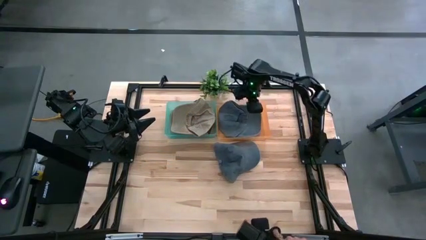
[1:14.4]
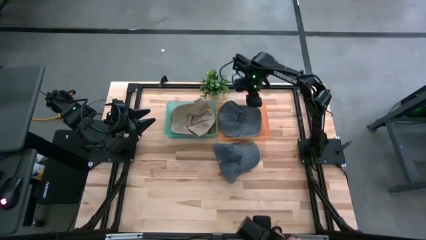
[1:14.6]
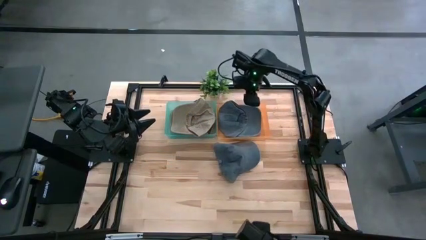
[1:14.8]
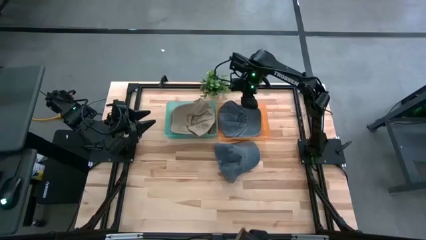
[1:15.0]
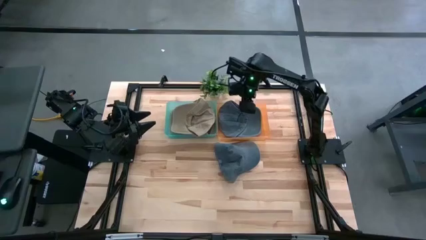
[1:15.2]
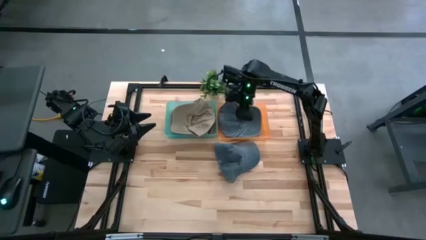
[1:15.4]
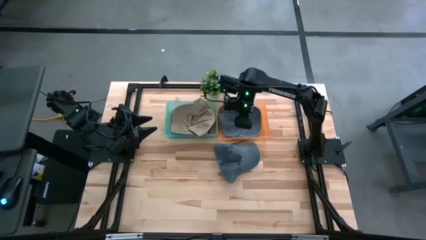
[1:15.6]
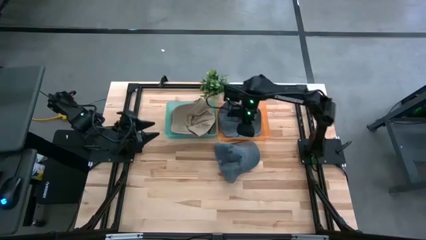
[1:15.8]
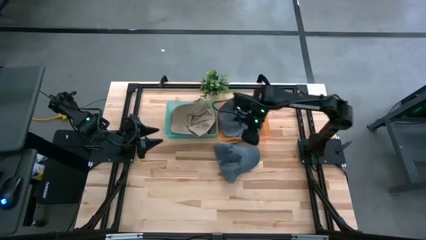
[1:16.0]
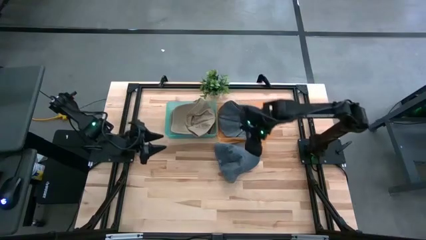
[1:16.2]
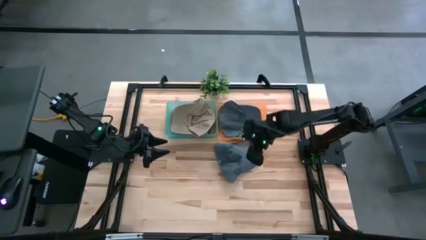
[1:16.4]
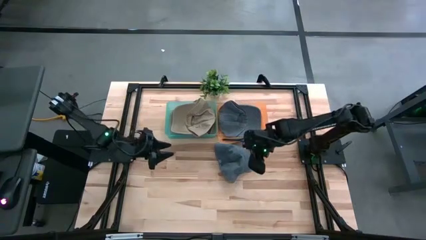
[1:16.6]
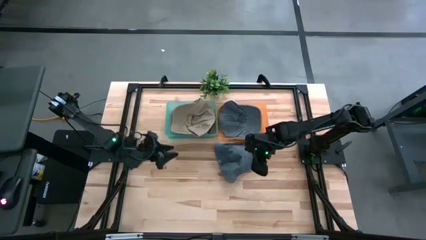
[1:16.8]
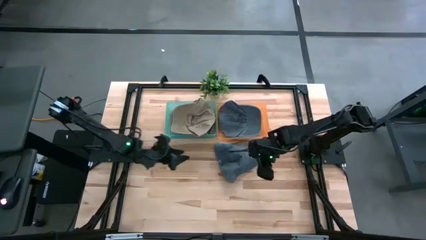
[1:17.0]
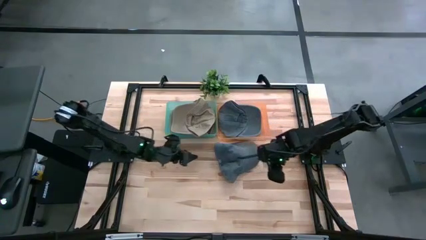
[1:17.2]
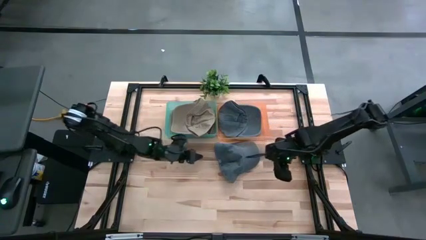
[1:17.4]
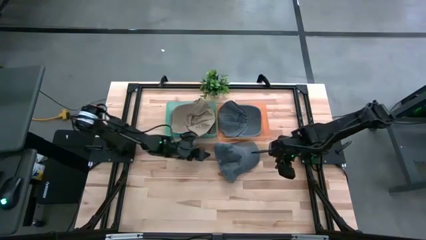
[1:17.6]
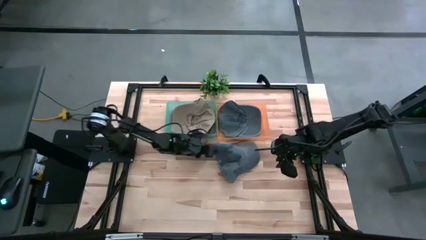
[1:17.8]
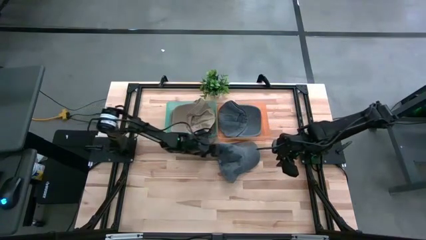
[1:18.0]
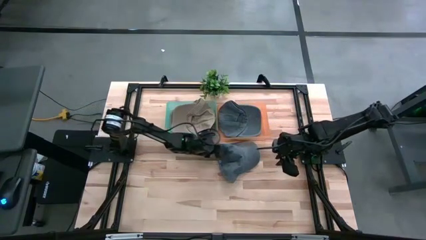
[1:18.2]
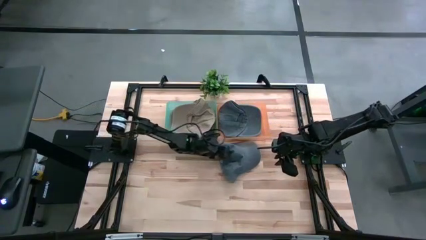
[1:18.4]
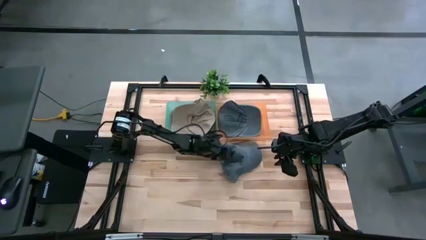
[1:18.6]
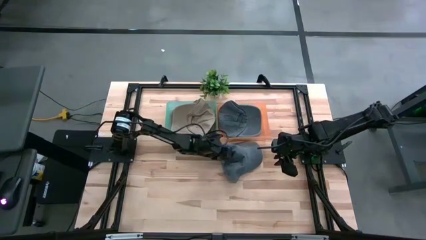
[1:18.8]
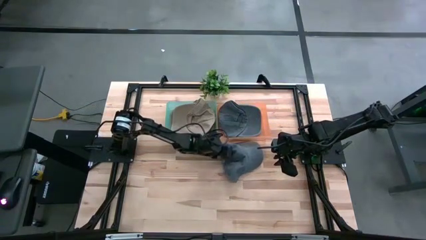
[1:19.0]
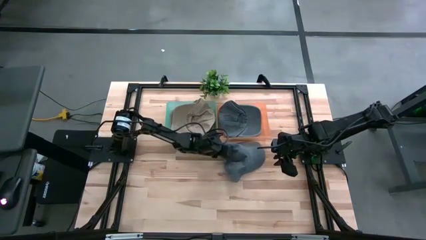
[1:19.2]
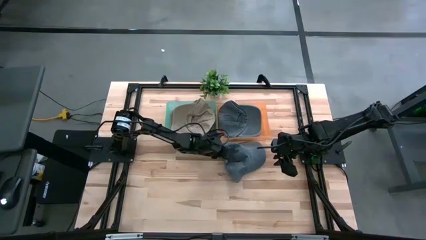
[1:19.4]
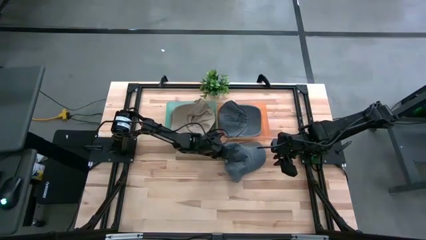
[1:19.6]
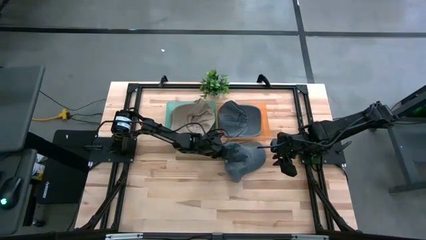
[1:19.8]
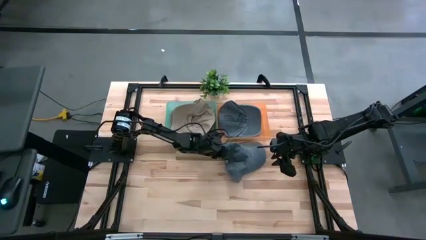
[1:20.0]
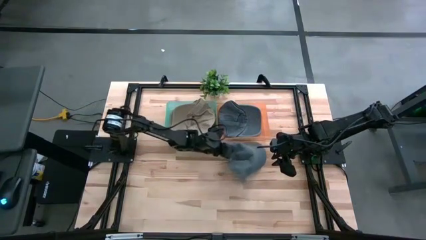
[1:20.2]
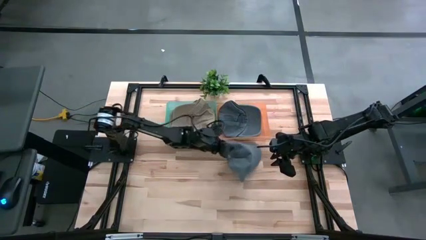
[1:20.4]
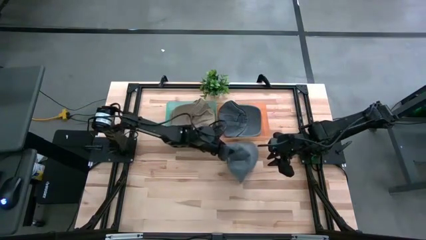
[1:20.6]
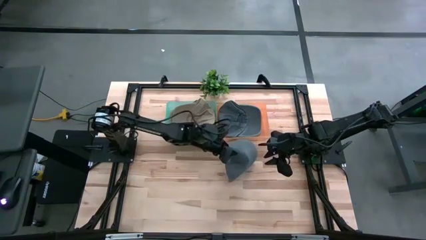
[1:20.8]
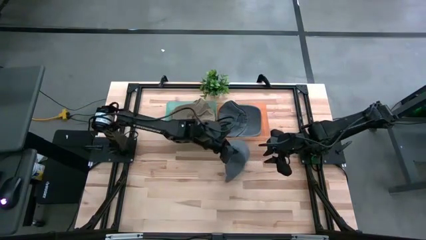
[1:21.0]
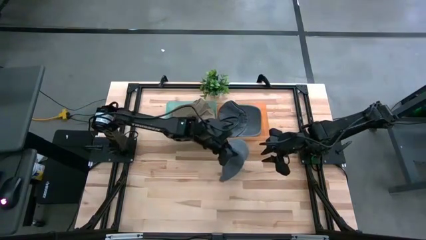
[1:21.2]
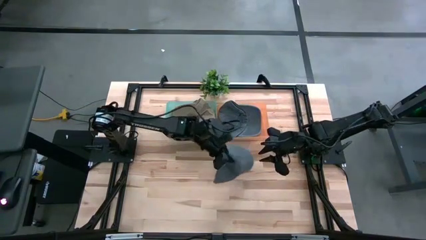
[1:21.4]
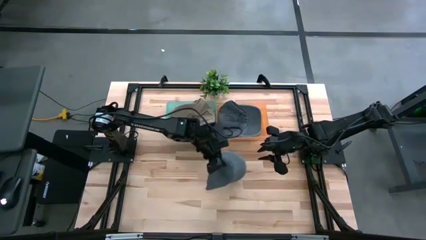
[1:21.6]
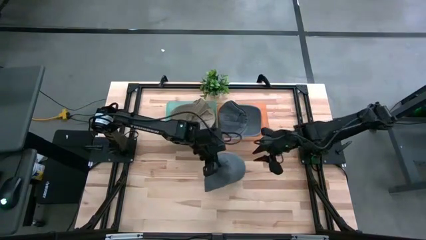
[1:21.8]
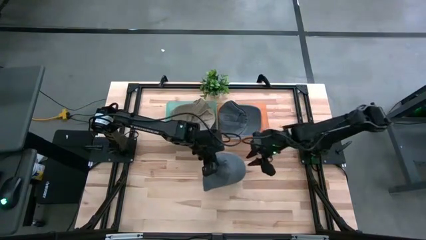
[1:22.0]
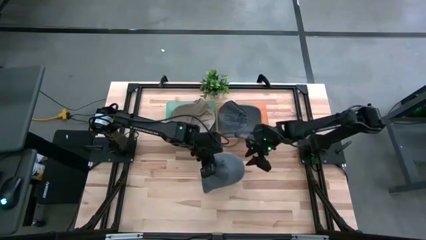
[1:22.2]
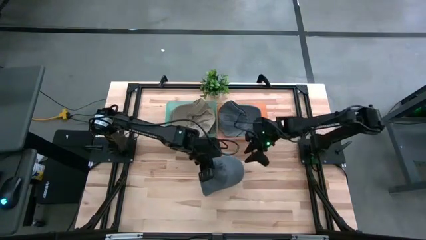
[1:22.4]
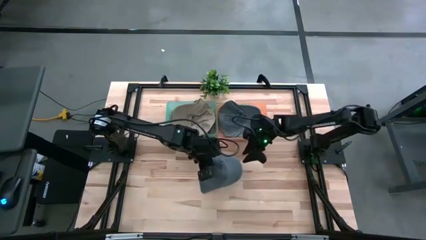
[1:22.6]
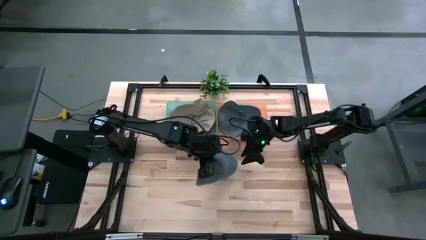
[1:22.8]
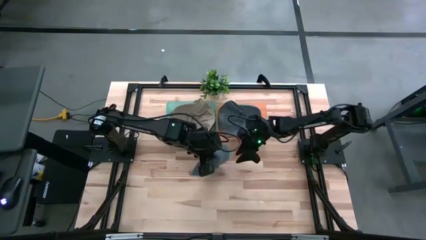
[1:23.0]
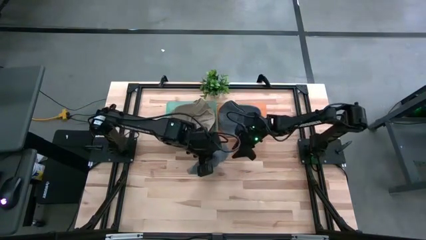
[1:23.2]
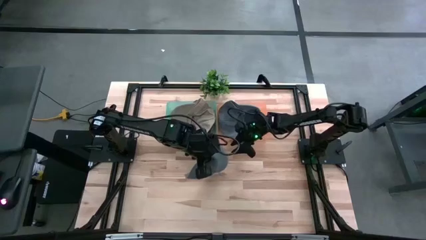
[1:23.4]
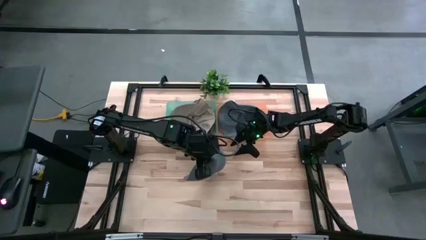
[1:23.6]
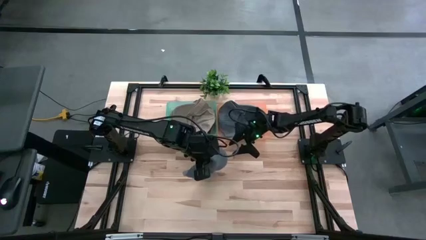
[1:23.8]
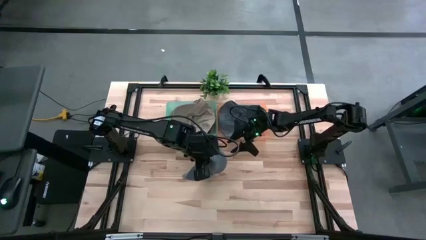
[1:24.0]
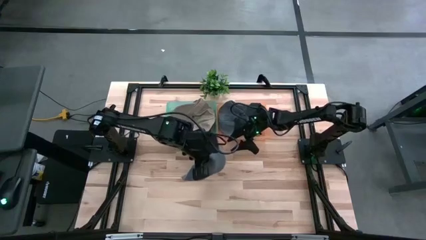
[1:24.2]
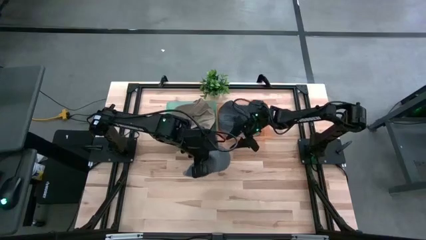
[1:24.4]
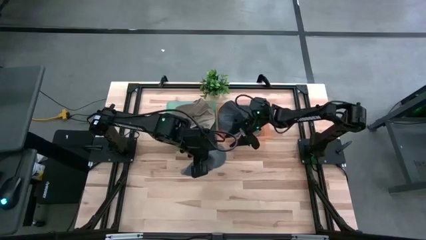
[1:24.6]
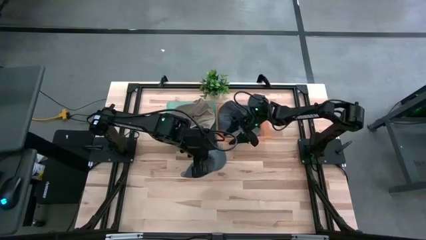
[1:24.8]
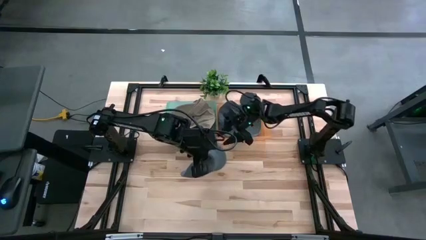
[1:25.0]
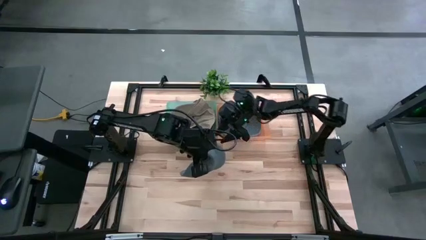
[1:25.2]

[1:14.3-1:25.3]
Task: Pick & Place hat
Put the blue cap into the orange bin

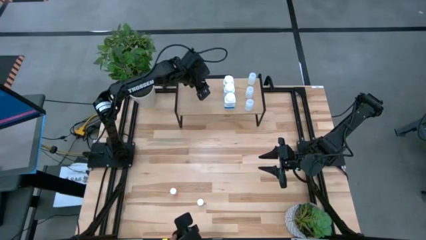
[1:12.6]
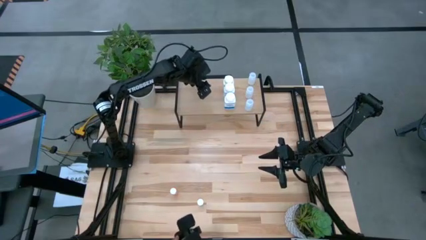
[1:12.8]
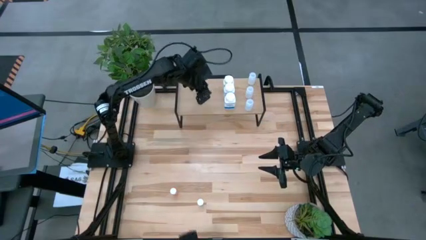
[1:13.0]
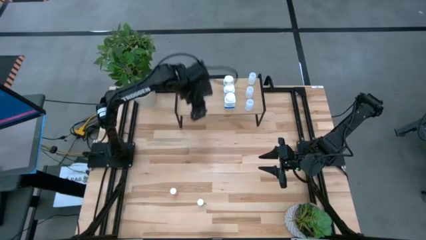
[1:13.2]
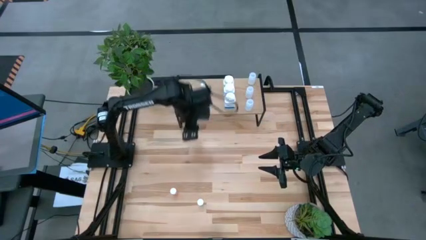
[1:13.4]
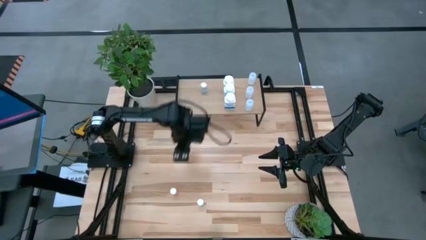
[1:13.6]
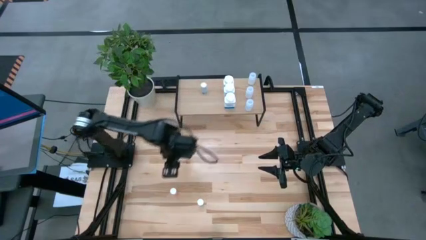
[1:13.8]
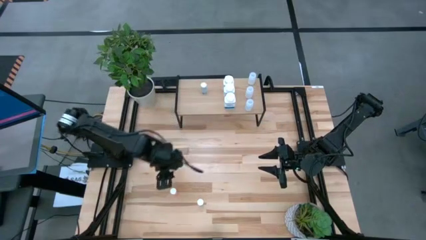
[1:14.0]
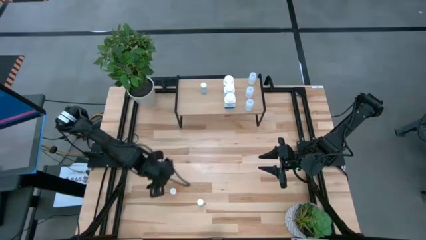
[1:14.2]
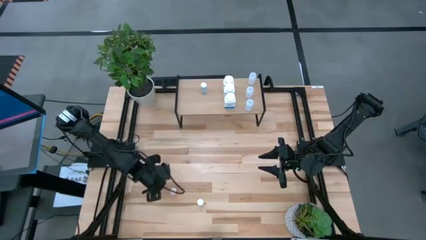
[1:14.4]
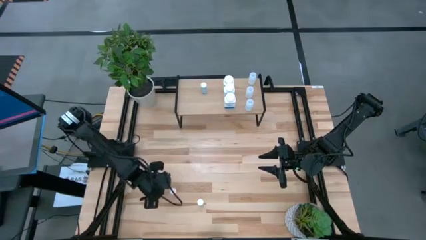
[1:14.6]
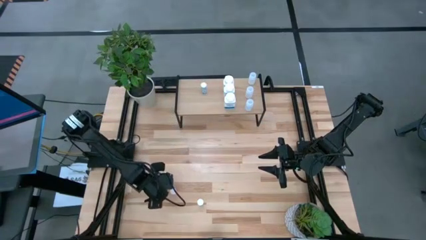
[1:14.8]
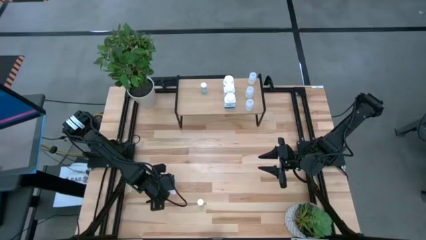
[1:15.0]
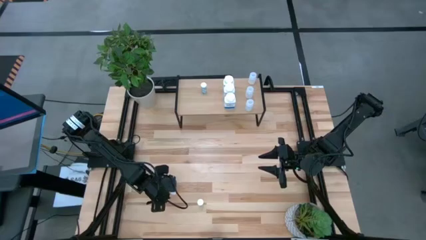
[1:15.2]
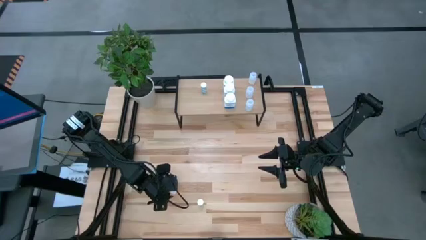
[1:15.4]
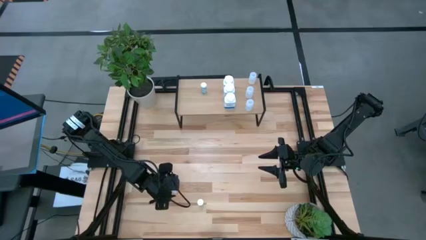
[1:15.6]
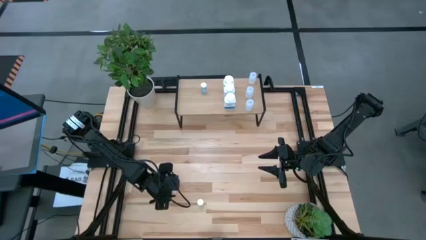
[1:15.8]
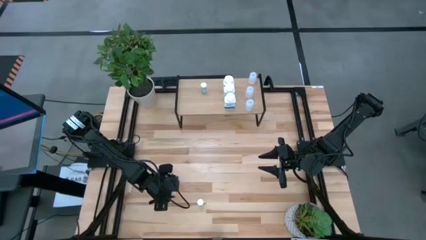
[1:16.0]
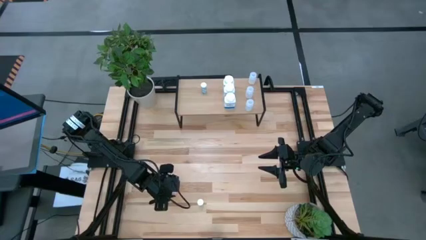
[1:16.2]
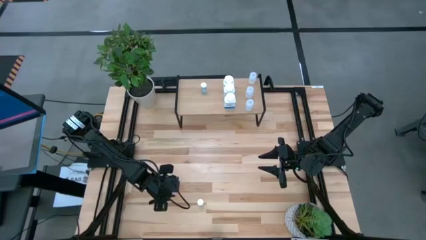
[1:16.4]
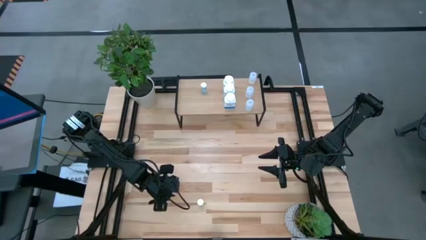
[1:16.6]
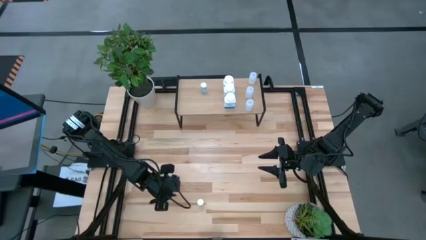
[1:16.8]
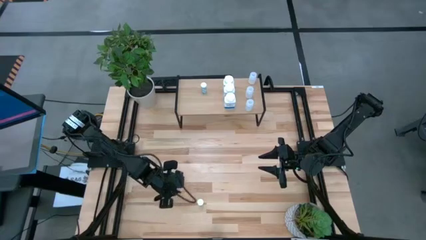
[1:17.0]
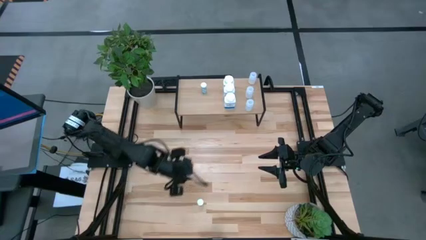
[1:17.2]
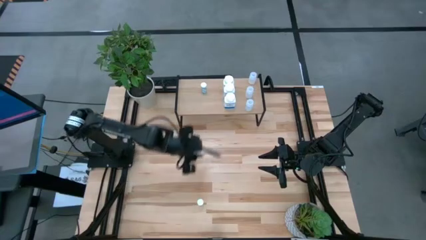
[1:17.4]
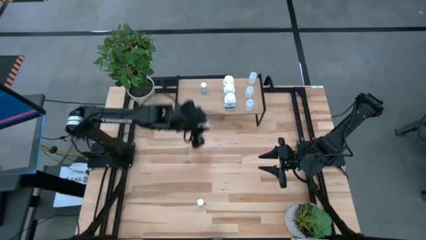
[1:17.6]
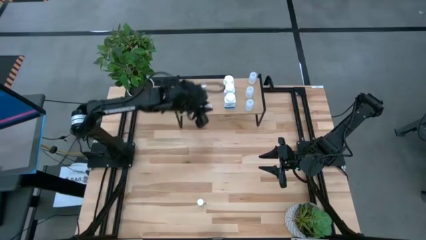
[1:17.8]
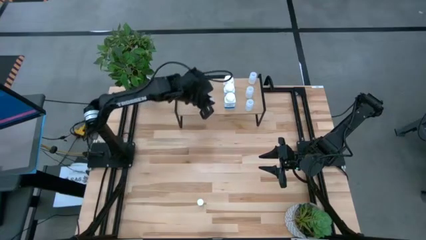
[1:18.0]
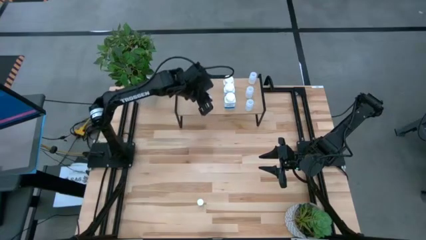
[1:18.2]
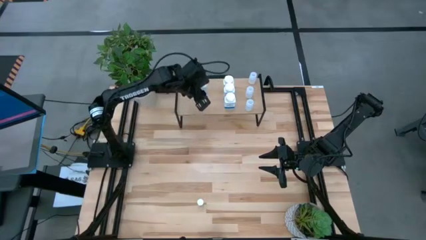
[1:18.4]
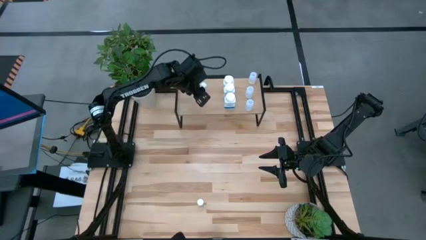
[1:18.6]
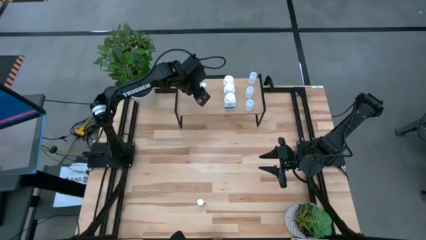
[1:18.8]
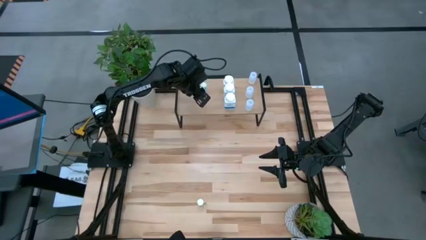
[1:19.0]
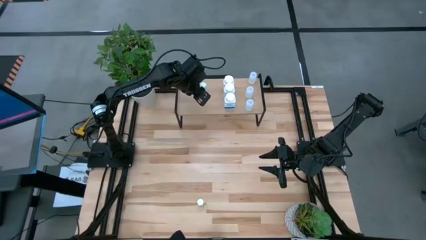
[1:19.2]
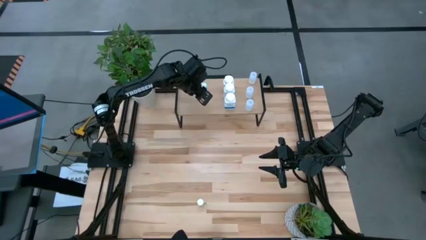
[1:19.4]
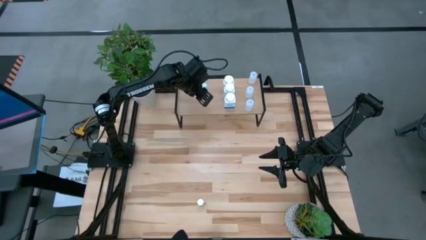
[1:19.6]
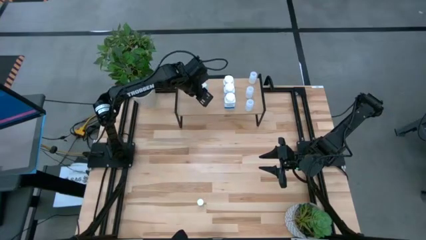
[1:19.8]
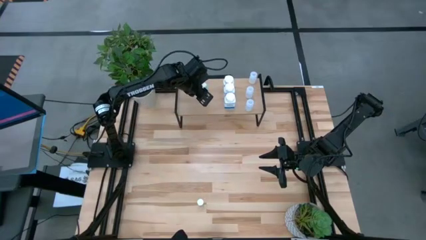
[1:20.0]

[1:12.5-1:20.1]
Task: Pick and place medicine bottles onto shelf by color
Align the orange bottle with the blue bottle on the shelf
